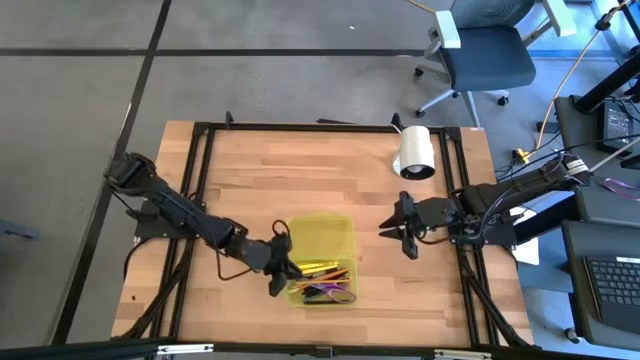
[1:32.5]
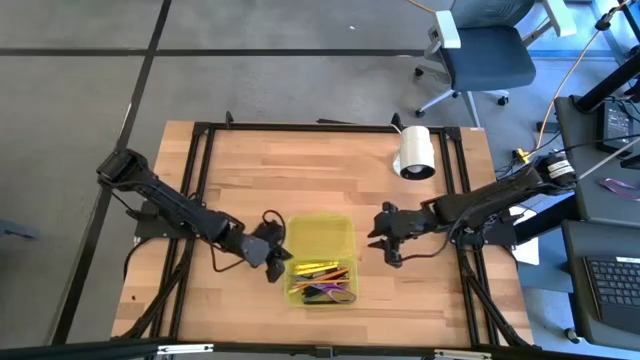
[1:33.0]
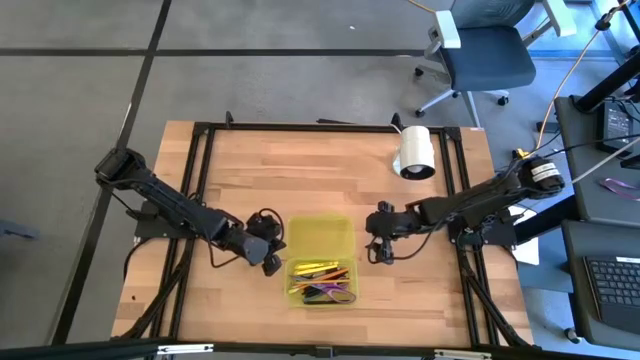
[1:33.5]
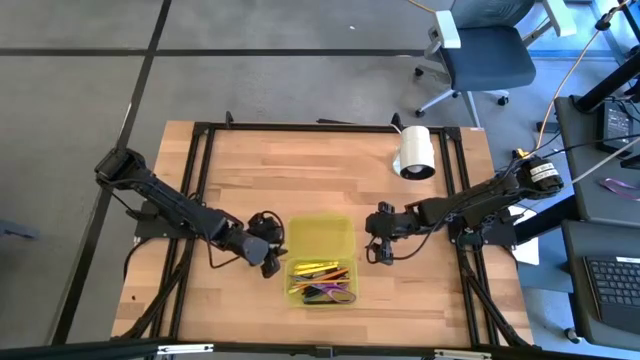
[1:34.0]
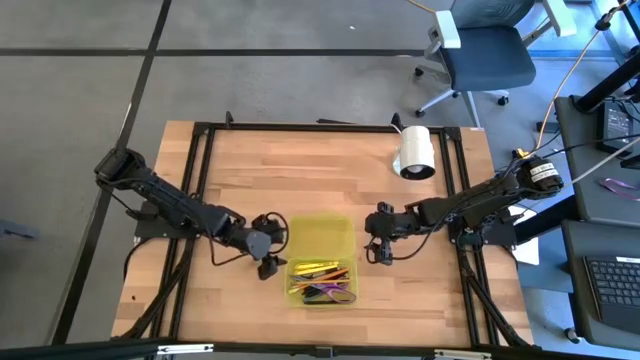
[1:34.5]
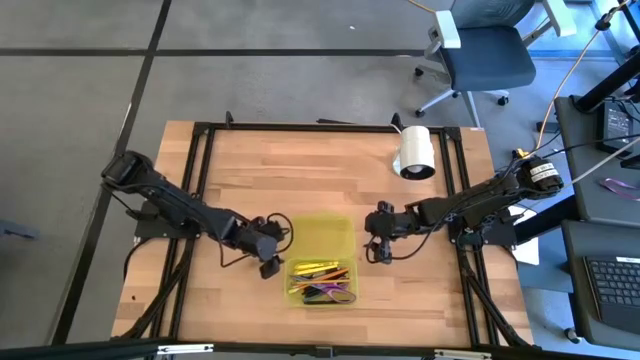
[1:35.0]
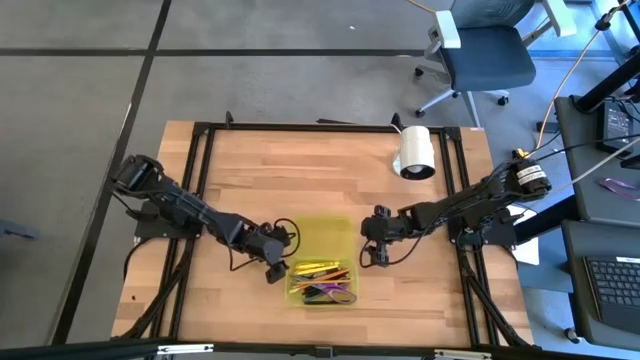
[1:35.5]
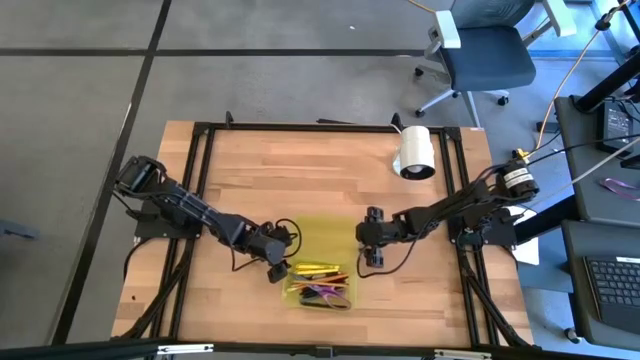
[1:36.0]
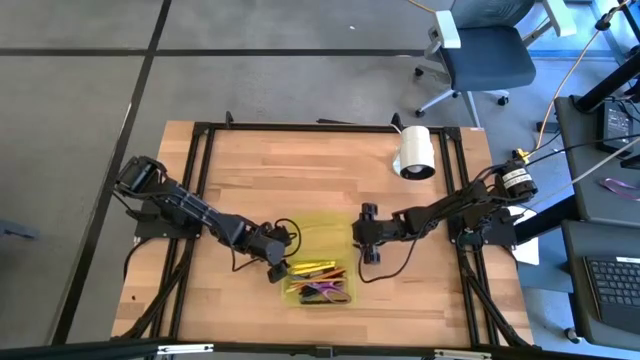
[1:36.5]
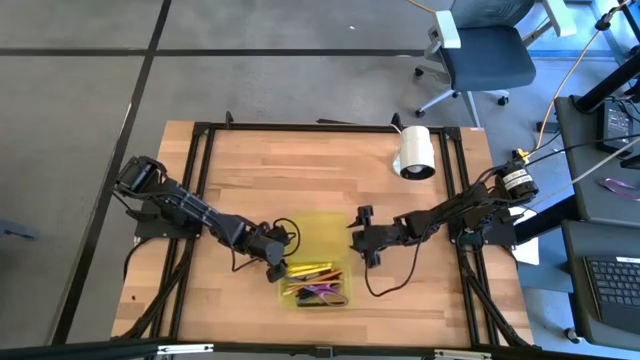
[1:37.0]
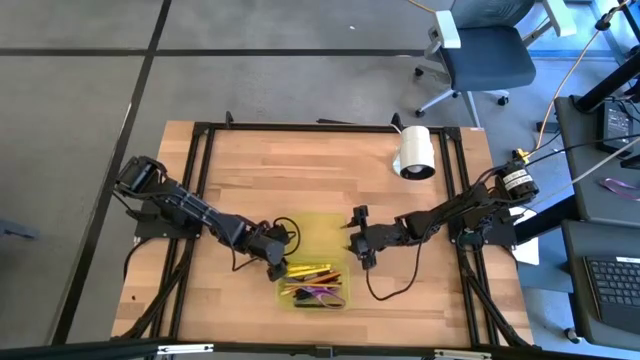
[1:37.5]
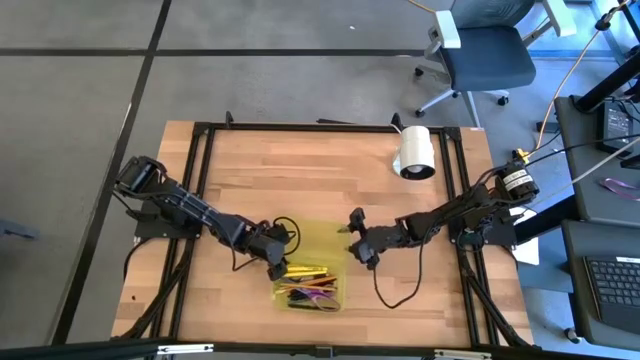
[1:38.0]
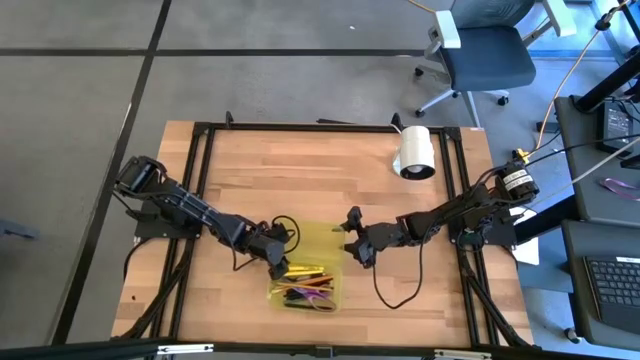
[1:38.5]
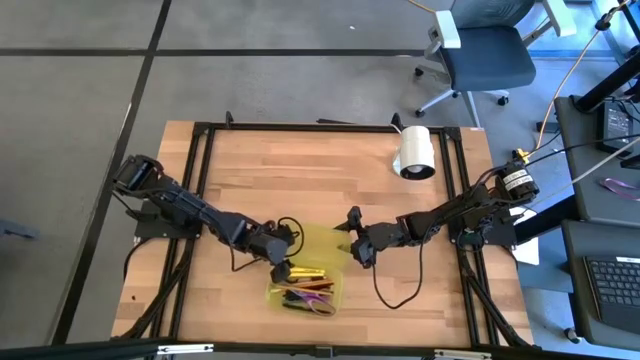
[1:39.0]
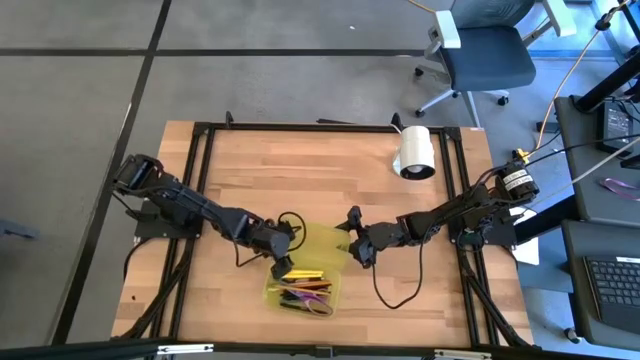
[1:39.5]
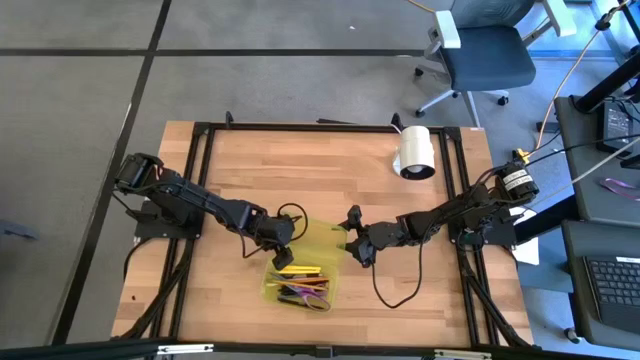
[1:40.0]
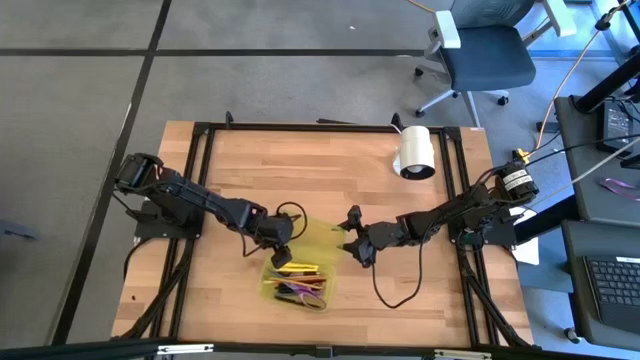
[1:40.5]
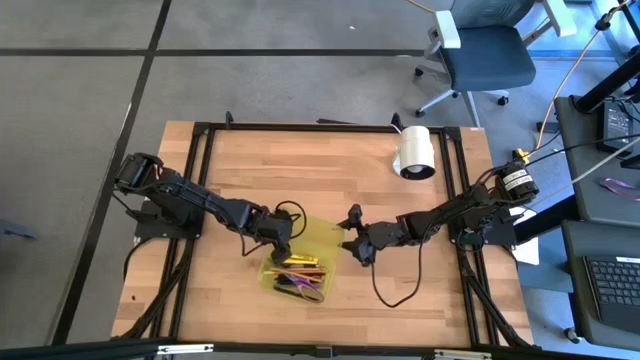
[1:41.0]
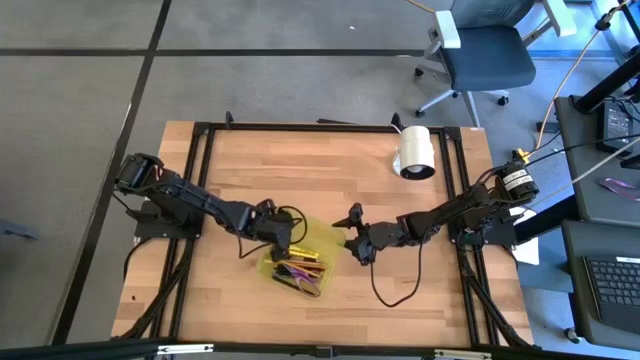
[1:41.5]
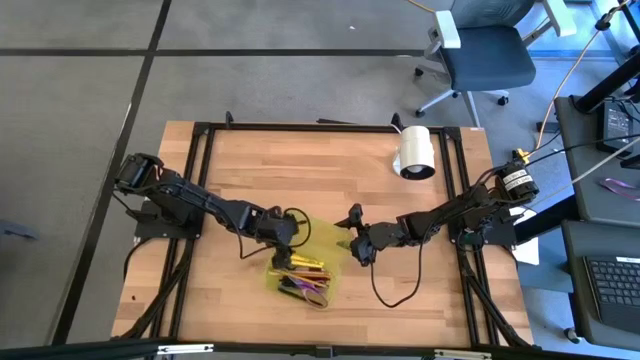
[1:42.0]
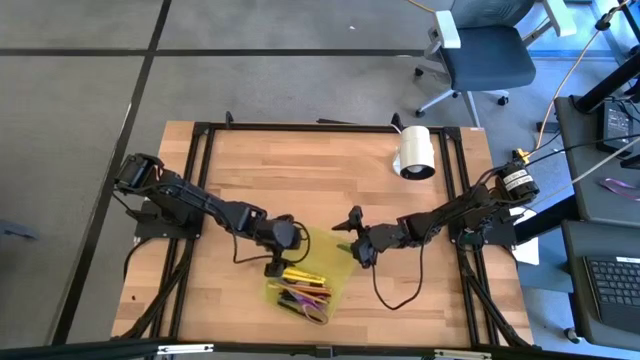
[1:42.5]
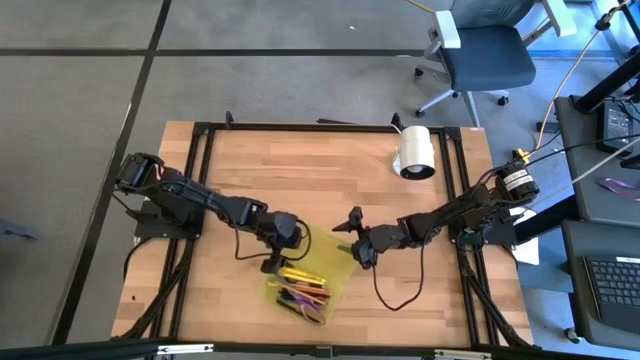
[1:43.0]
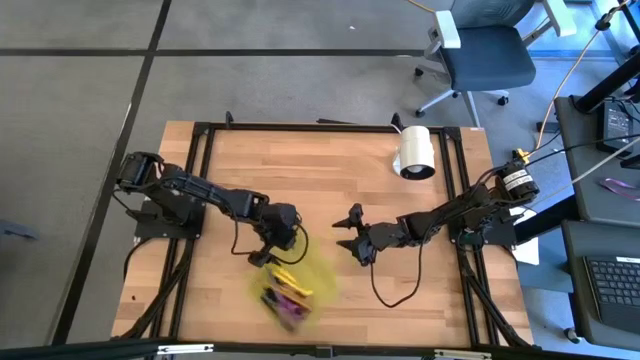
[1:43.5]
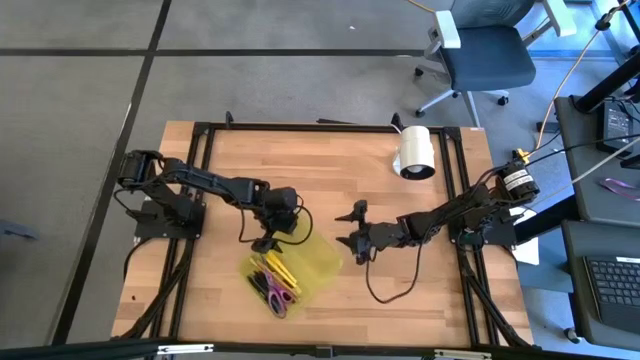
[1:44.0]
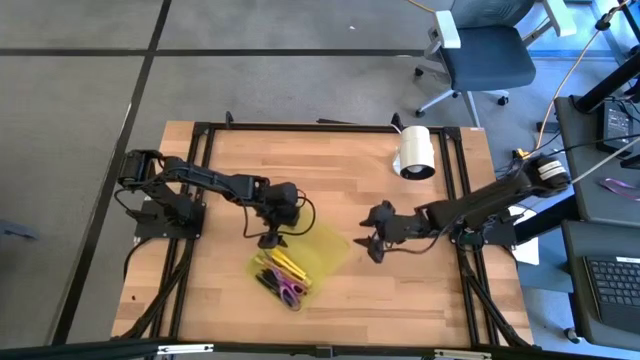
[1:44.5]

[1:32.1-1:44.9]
Task: Pick & place school supplies into a supply box
Close the yellow supply box

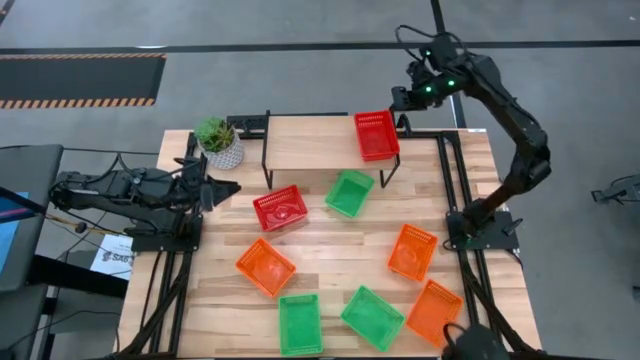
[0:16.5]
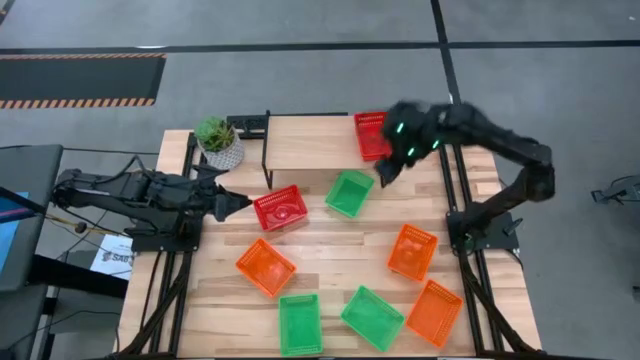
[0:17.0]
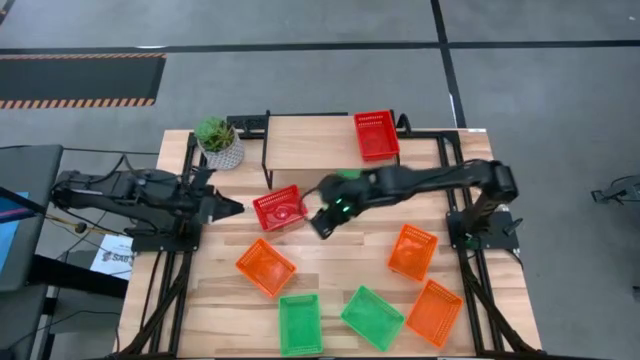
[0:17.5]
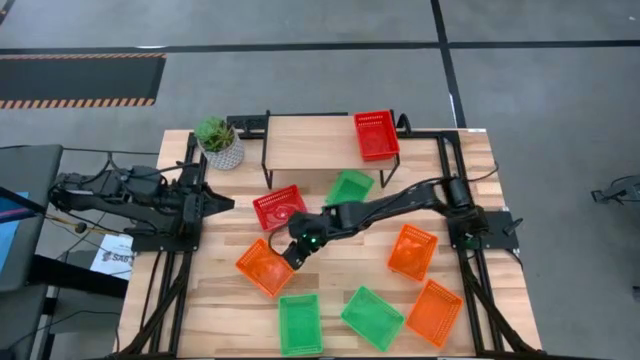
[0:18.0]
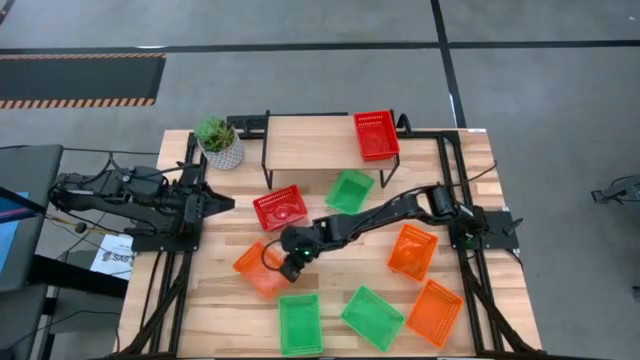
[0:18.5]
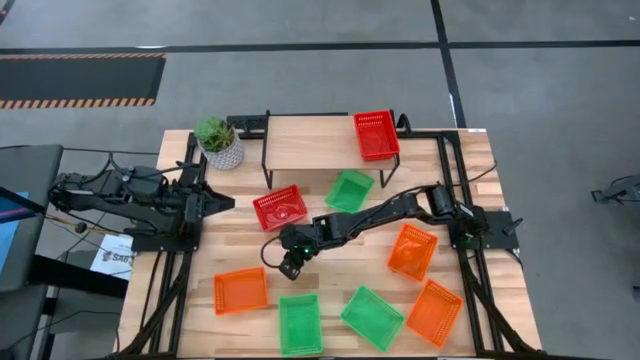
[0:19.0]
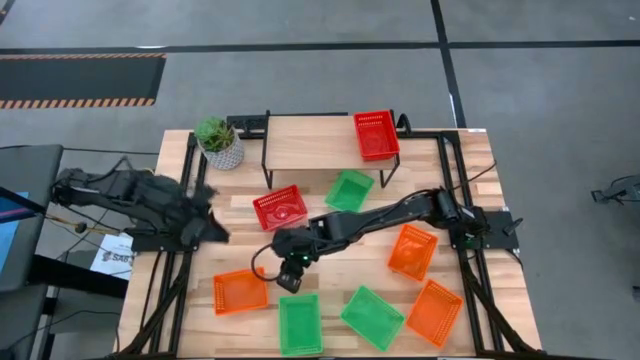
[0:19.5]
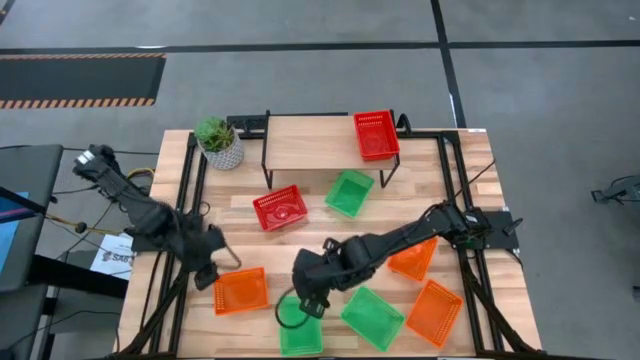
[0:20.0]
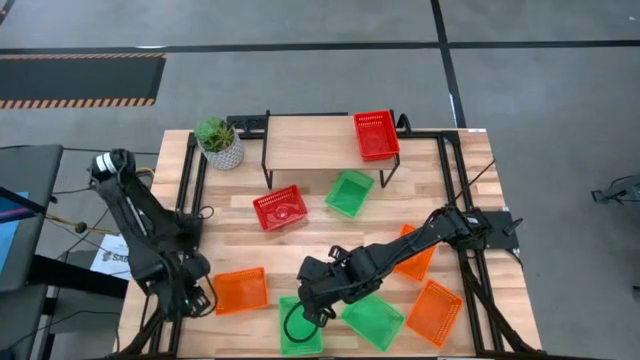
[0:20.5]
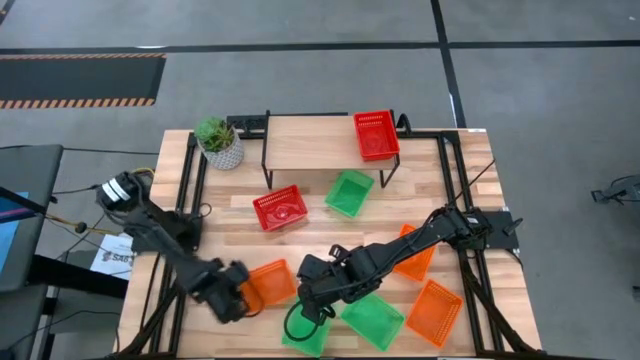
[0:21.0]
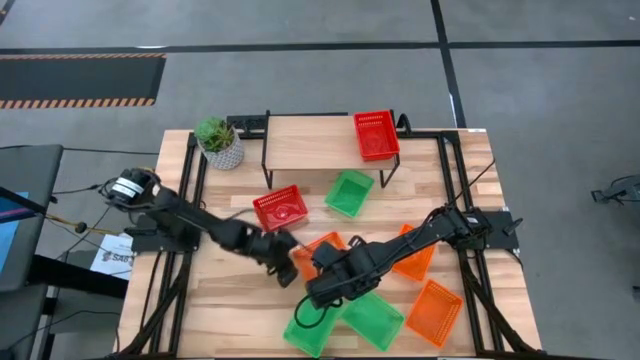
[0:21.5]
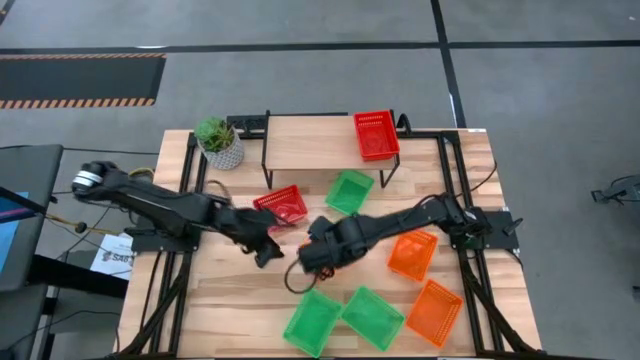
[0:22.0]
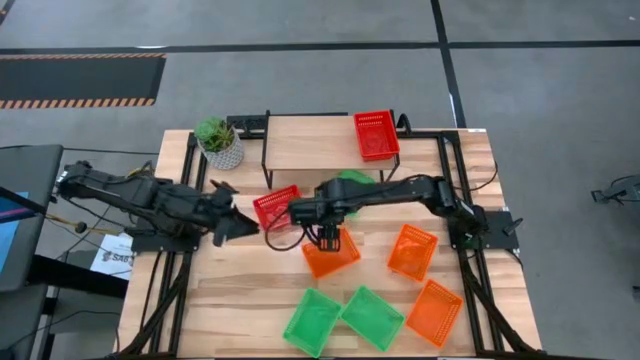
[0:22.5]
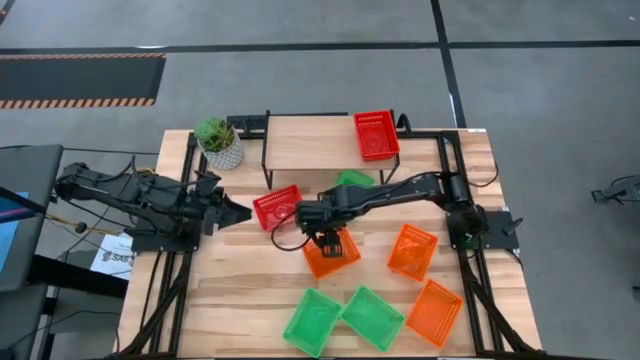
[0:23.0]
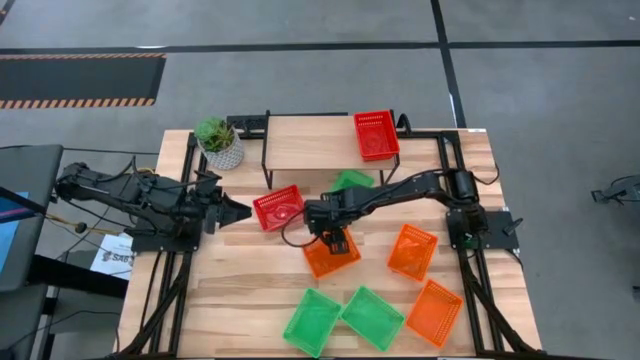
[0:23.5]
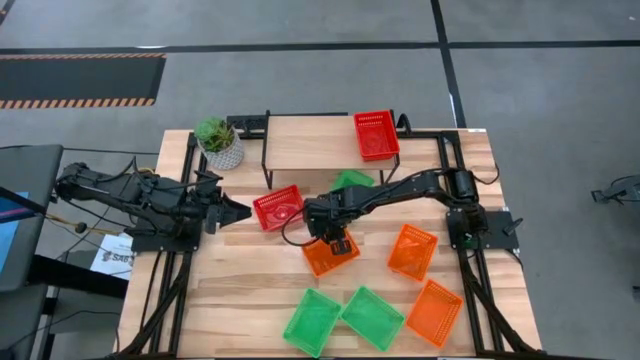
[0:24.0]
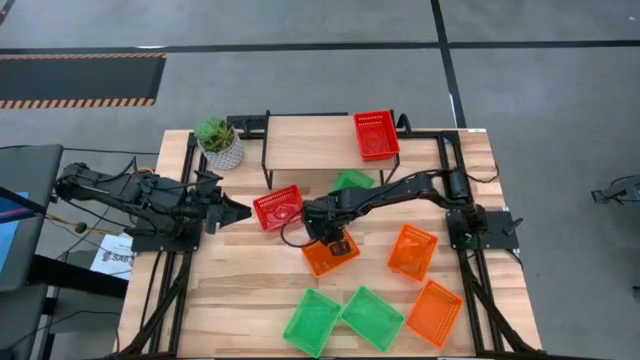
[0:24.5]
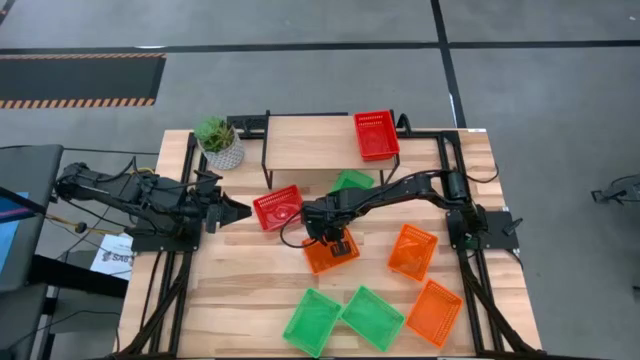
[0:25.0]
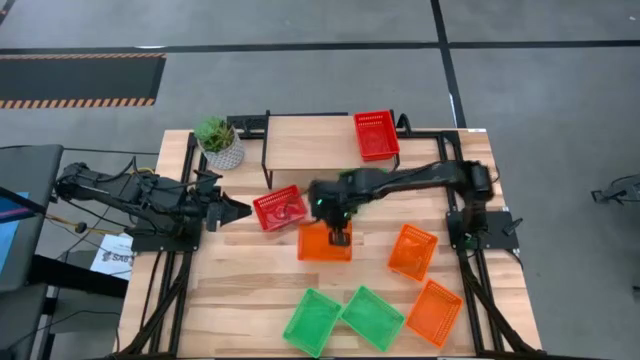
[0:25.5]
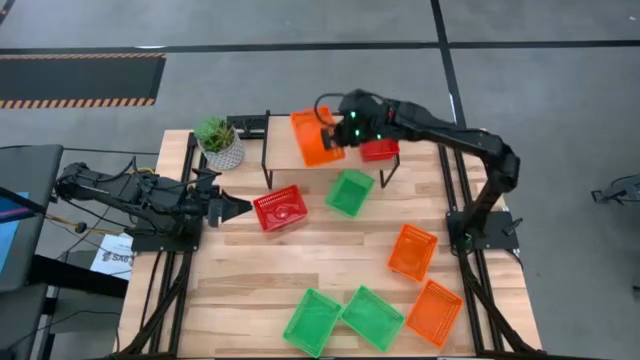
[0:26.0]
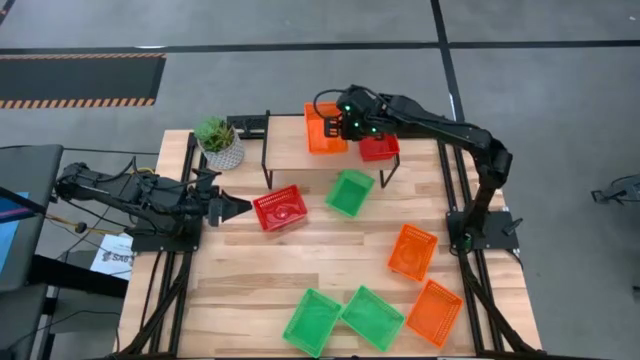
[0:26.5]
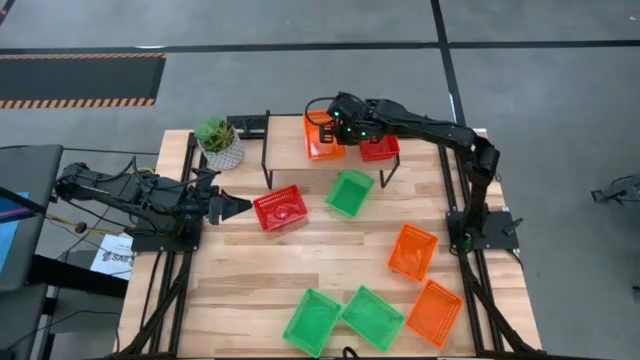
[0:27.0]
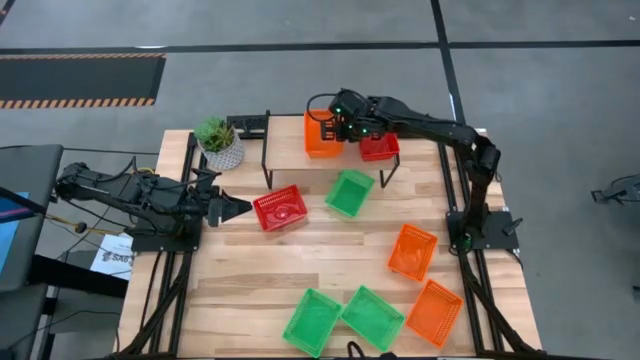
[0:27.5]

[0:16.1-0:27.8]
Task: Stack baskets on shelf by color
Put the top left orange bin on the shelf
